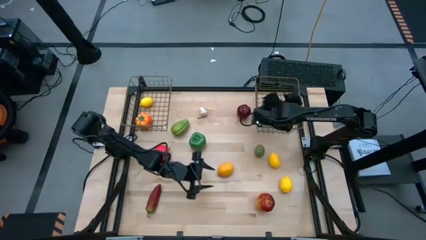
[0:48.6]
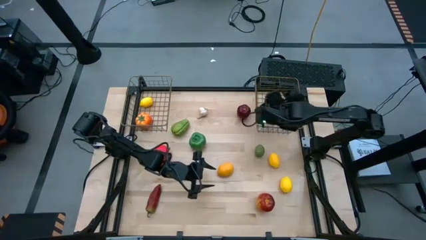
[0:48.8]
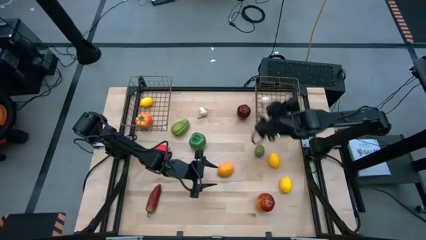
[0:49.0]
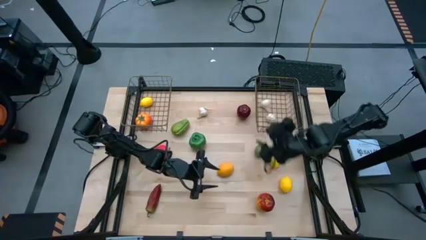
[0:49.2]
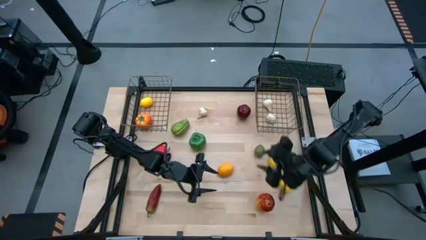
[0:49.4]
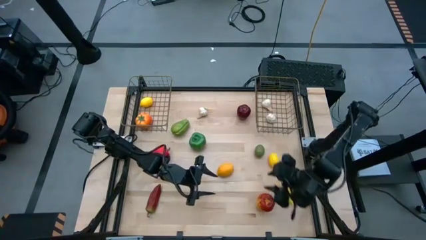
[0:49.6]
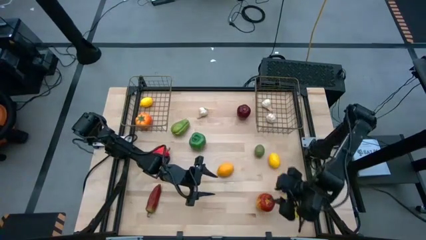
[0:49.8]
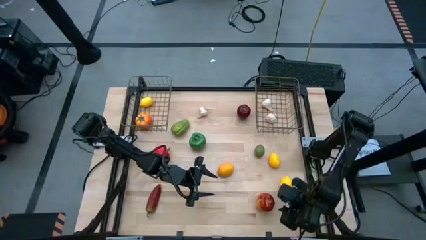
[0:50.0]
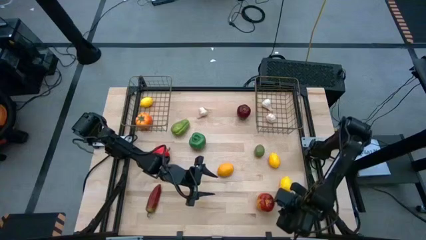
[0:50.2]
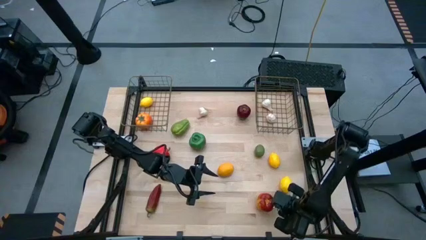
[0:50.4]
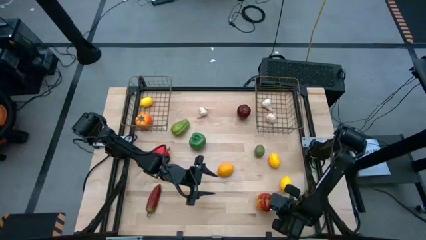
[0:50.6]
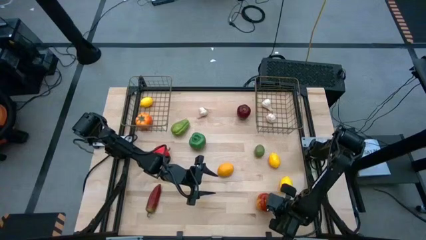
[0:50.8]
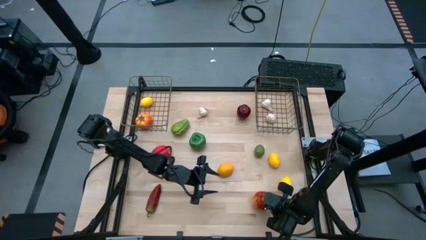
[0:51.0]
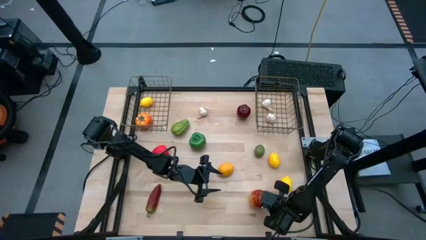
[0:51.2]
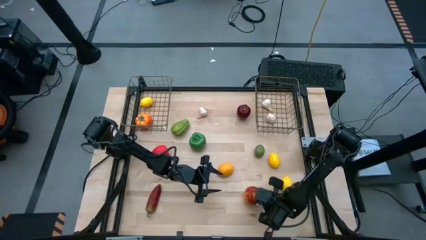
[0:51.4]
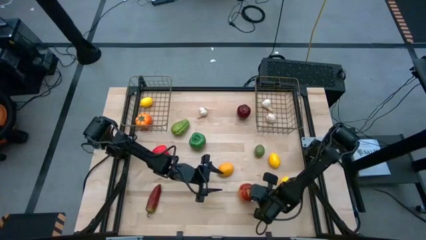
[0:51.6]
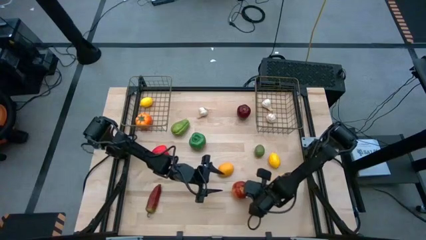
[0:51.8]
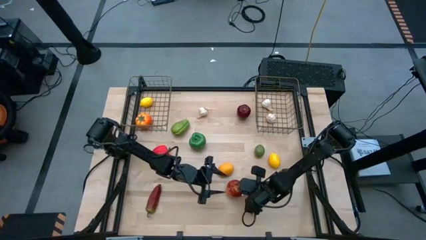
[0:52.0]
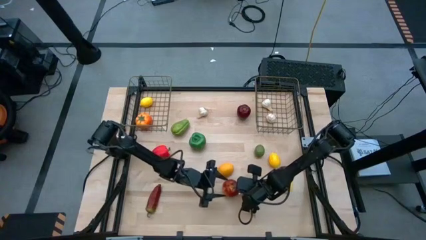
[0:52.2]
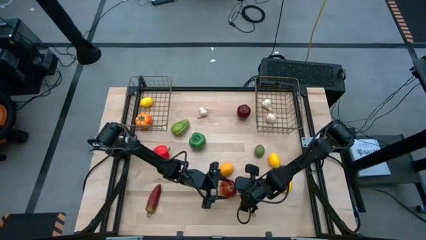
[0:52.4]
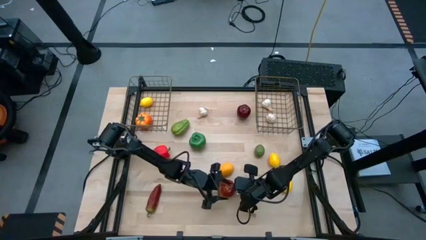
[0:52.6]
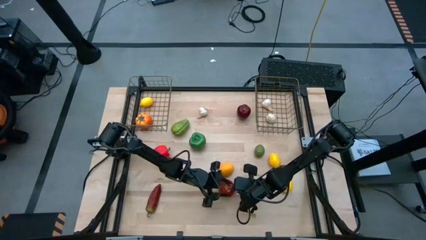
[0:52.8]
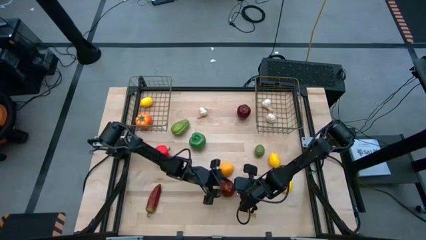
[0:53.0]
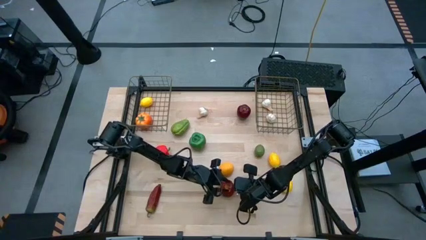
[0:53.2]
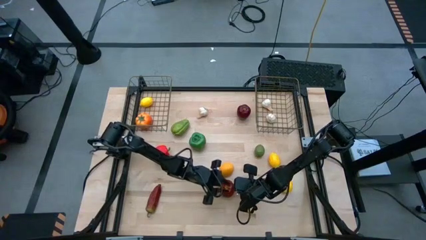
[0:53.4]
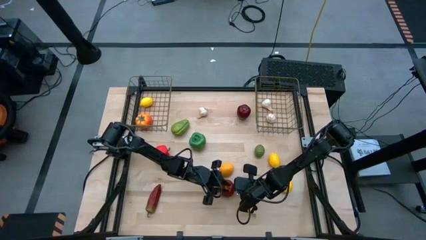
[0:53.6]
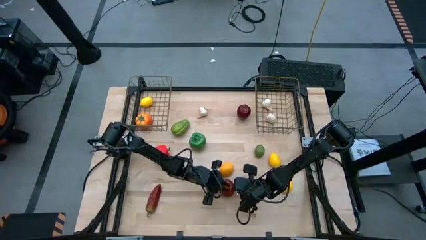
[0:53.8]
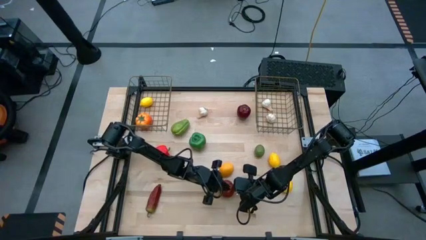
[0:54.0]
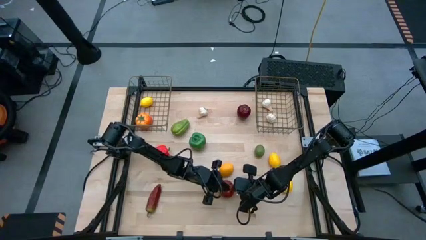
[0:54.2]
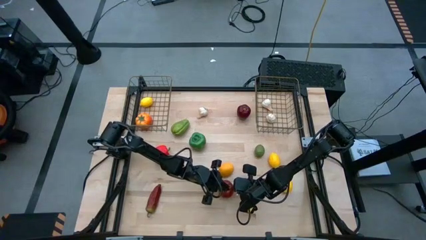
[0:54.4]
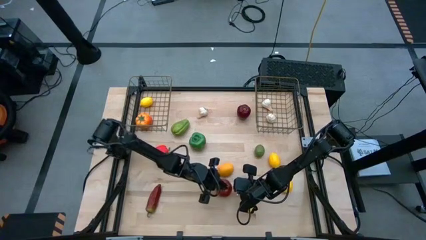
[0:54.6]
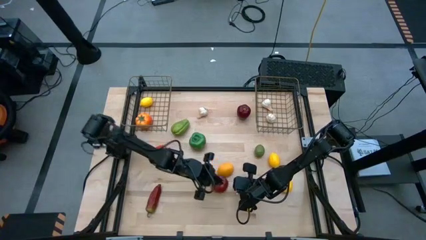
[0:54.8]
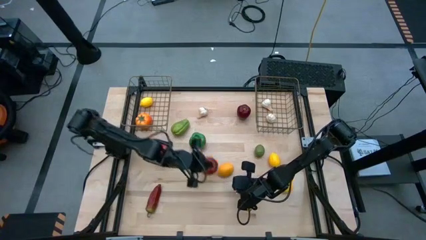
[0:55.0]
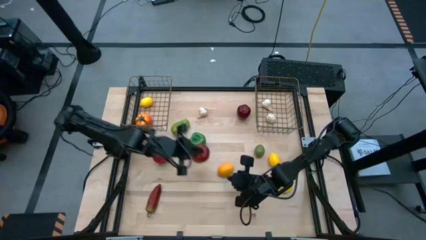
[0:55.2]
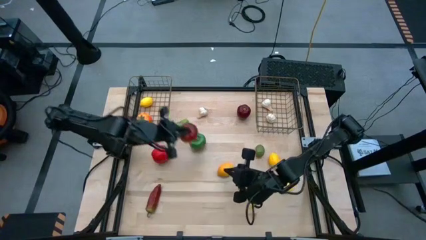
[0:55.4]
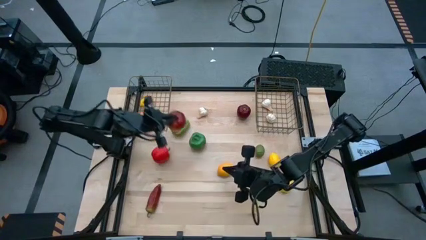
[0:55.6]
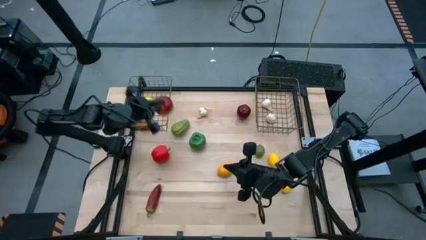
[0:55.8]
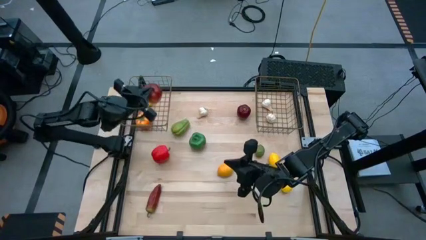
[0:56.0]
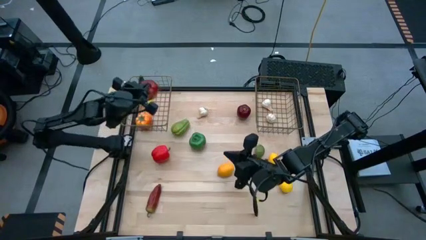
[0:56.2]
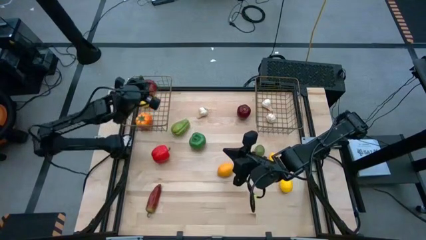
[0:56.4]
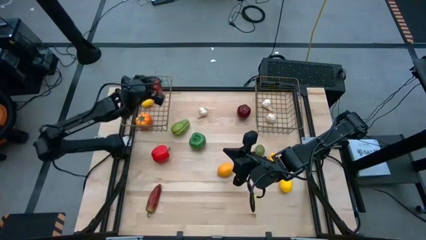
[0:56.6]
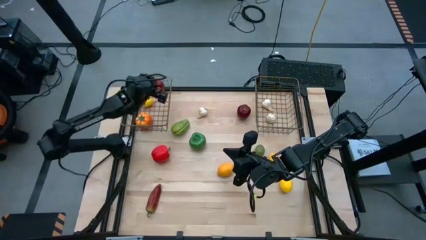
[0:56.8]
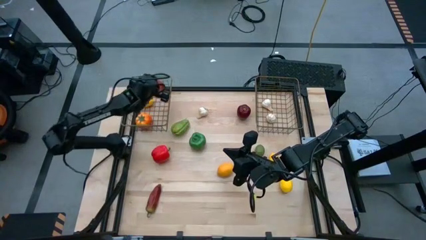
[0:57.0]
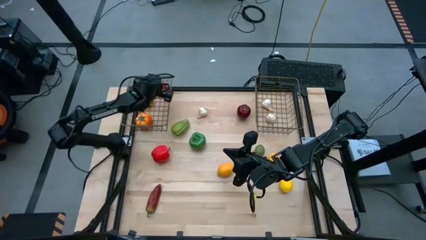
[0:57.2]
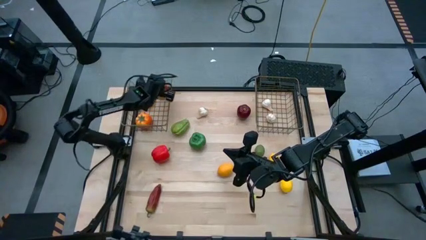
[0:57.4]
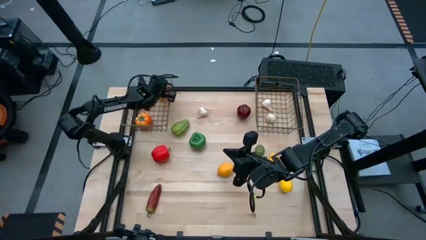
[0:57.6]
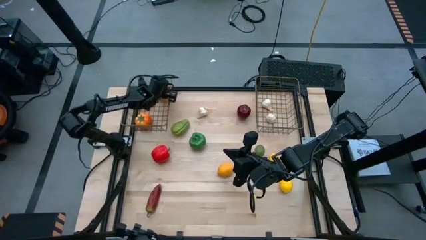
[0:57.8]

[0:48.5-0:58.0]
Task: Sort produce into baskets
Put the bottom red apple into the left basket
